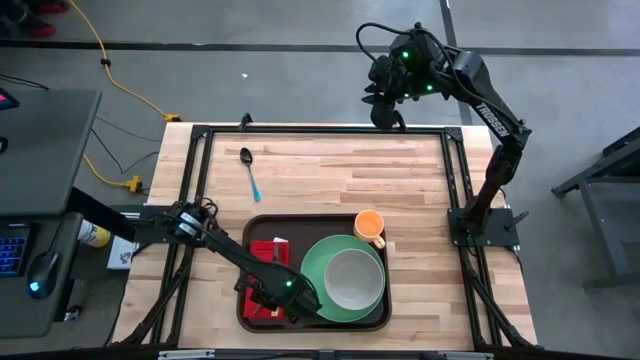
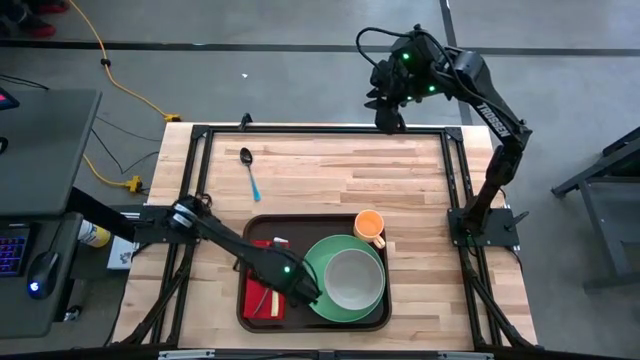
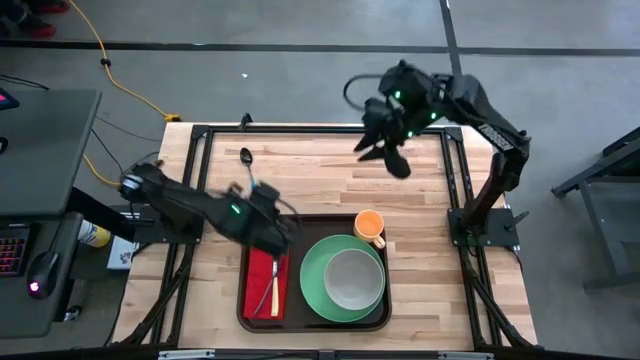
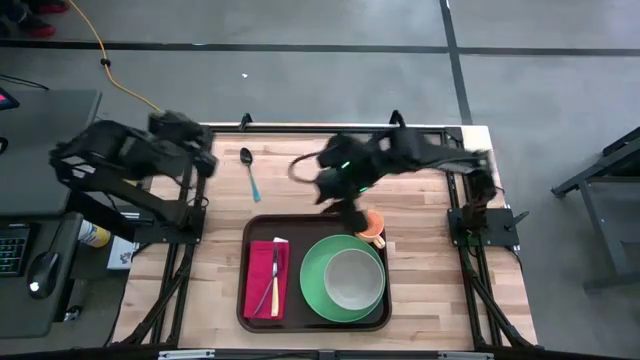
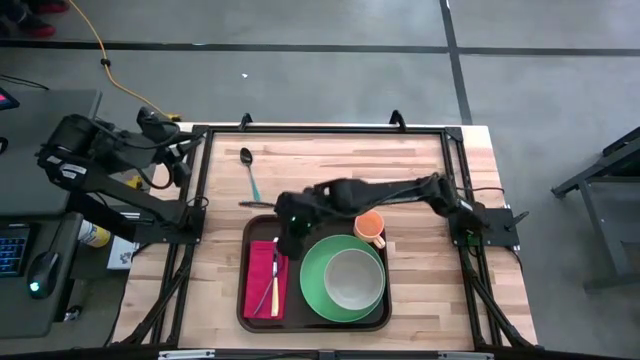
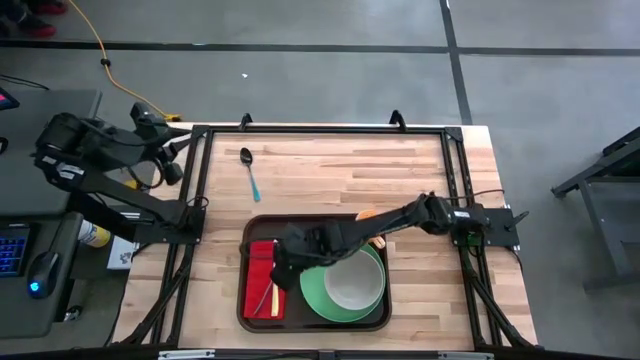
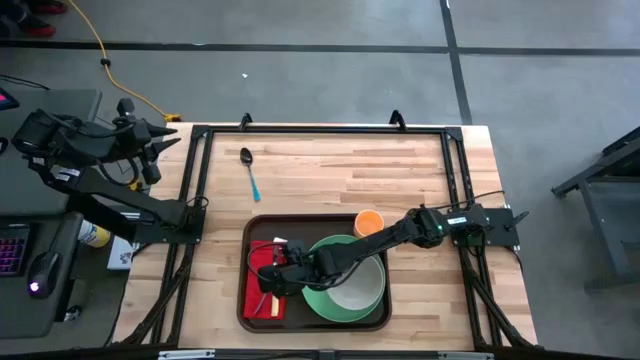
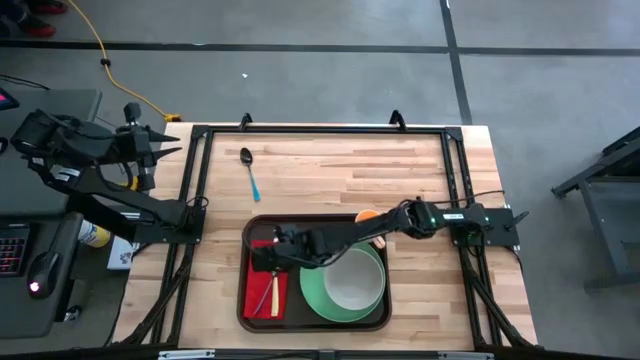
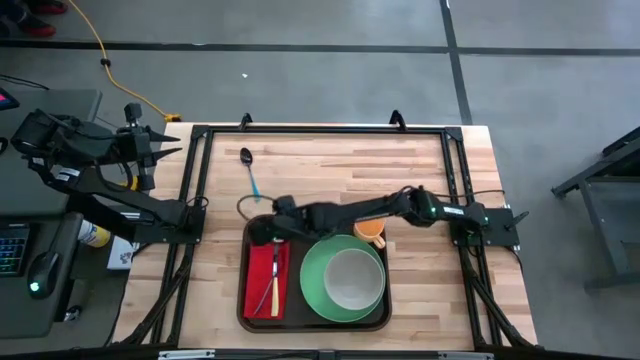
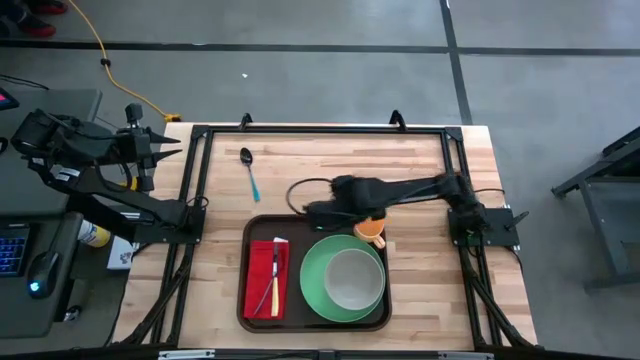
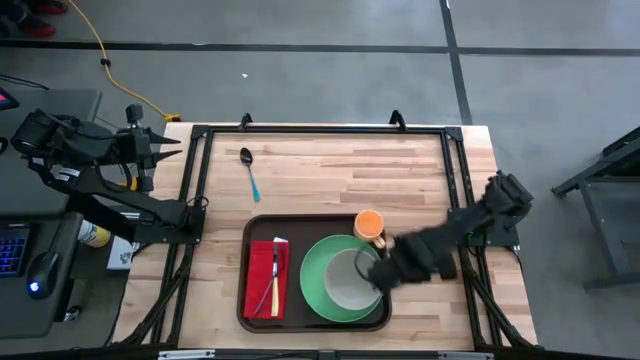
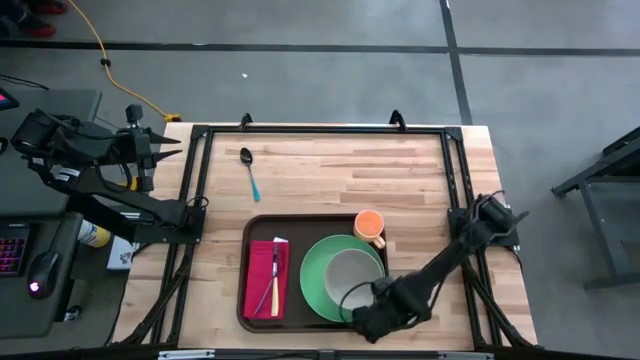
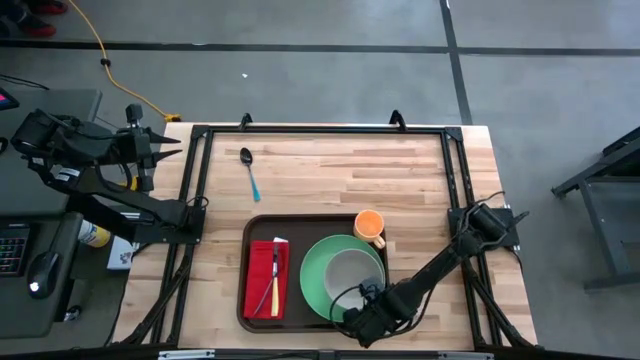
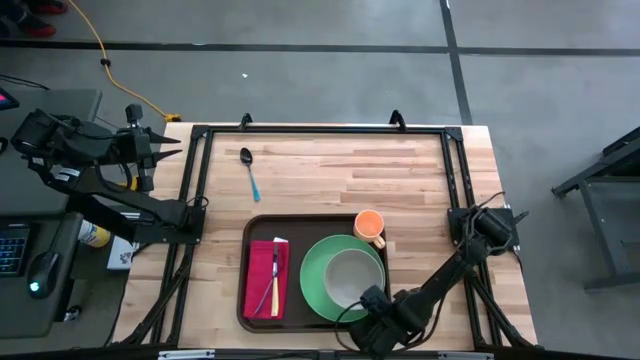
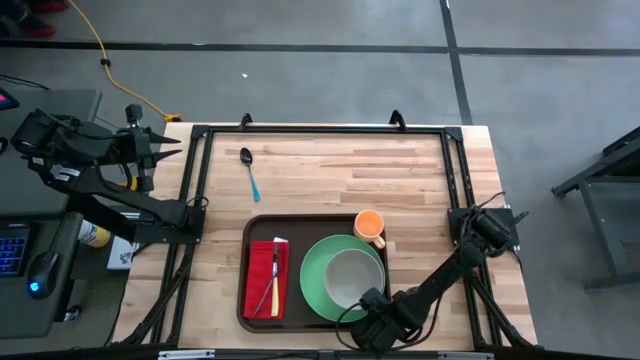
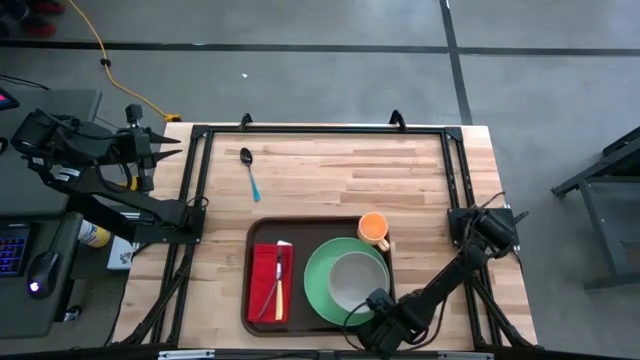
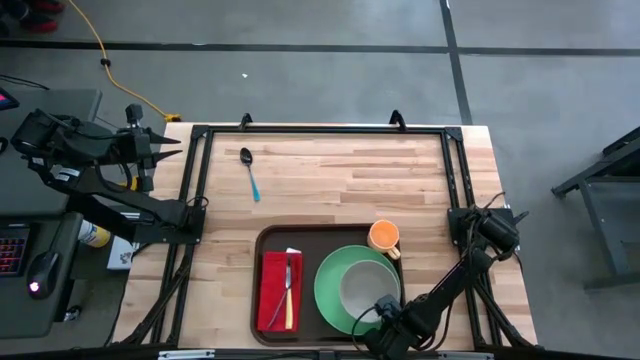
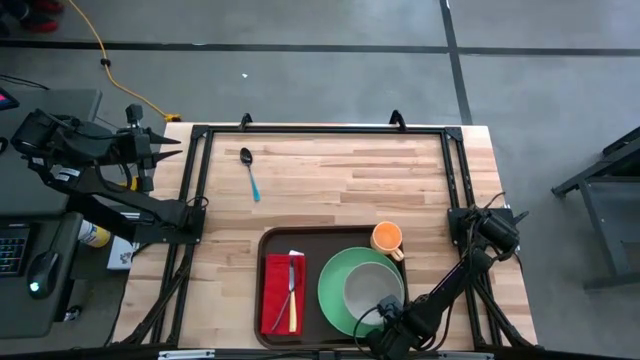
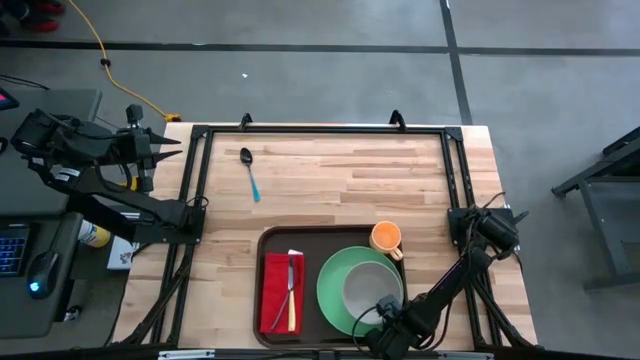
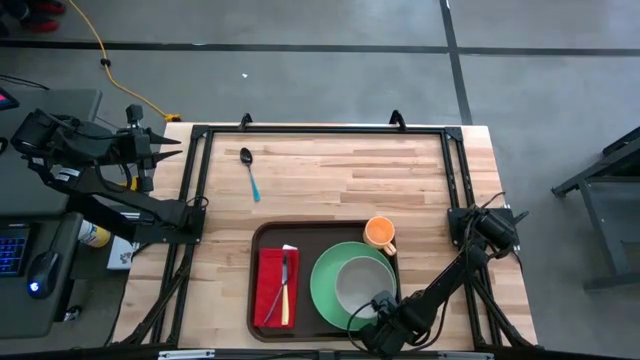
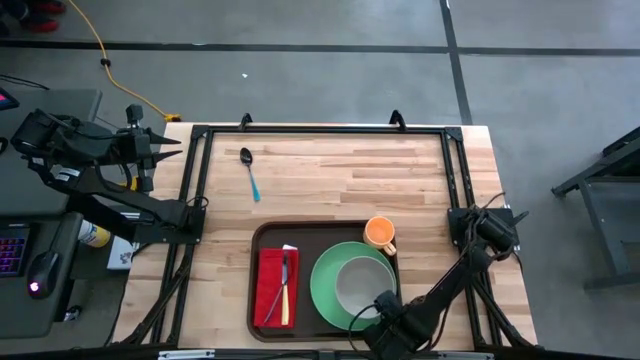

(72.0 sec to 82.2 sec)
Task: Set up tray
Adjust the black serving tray

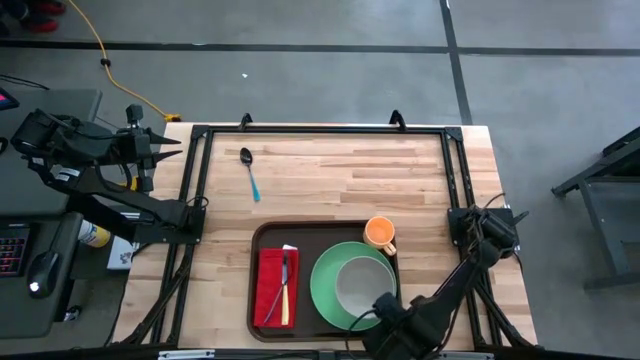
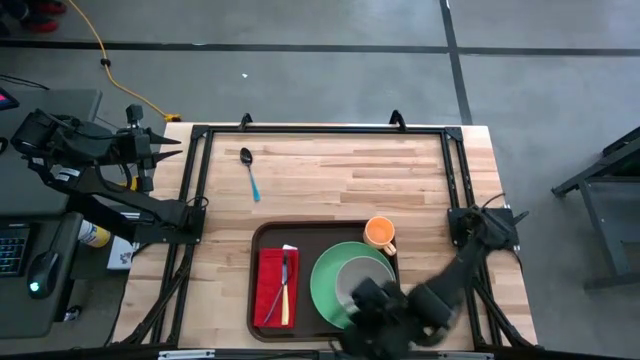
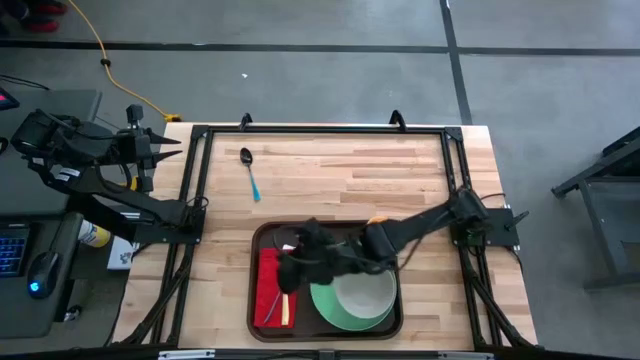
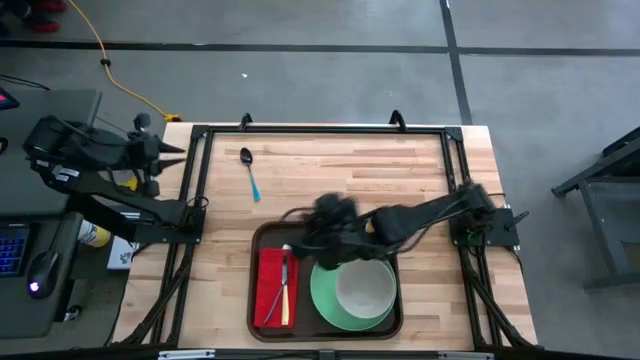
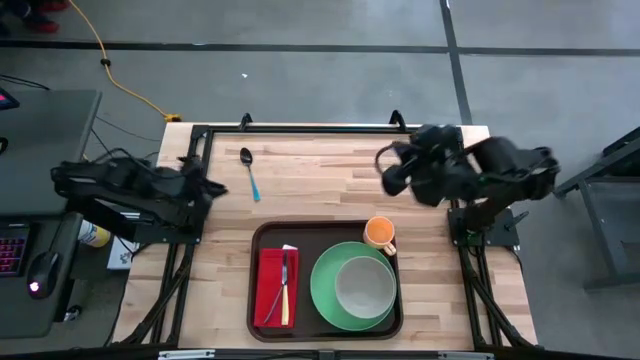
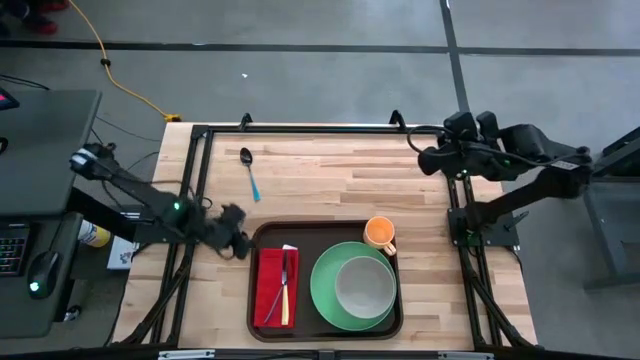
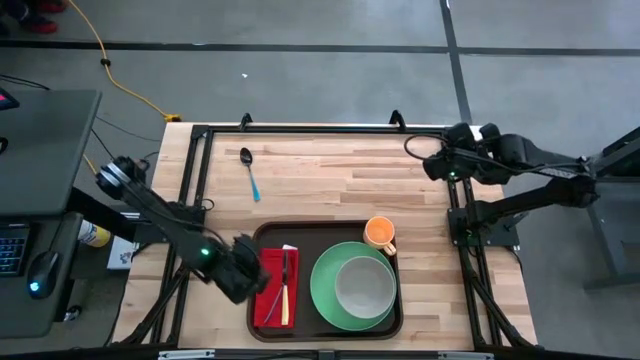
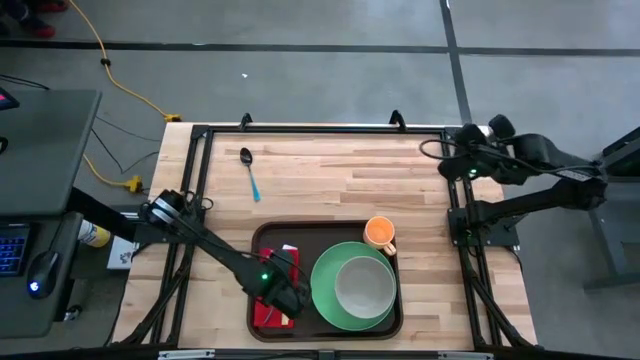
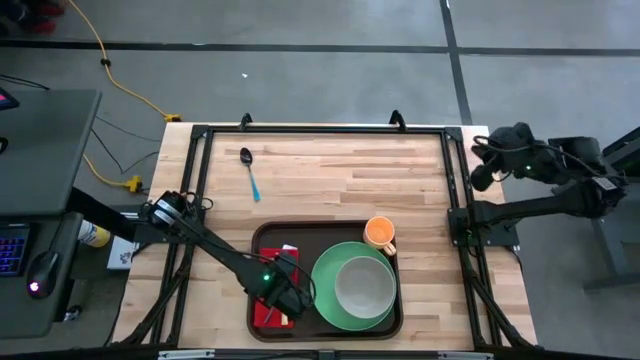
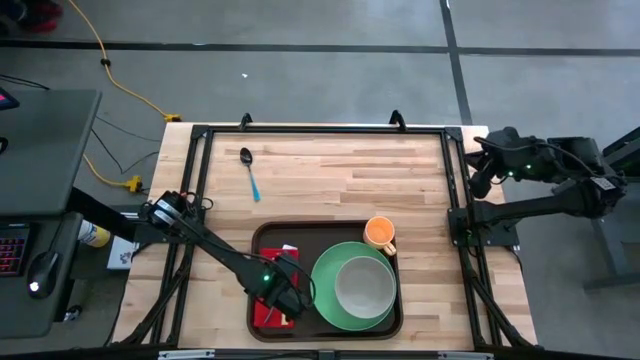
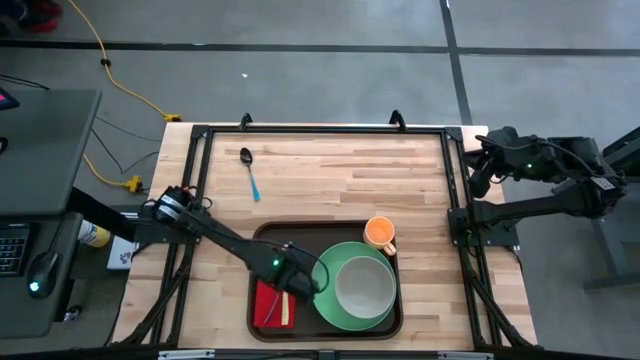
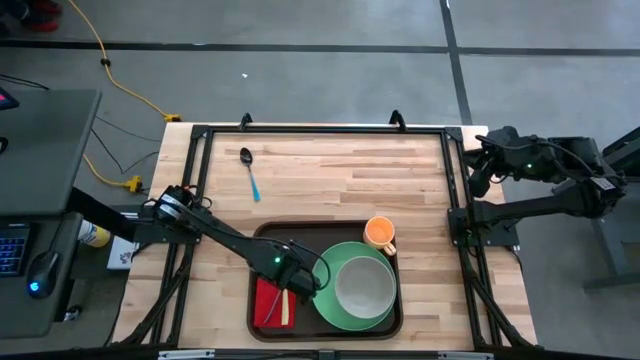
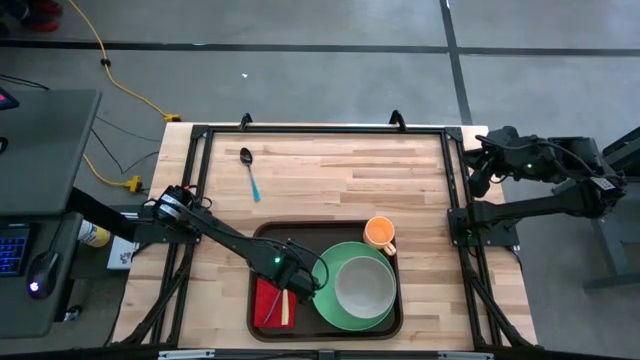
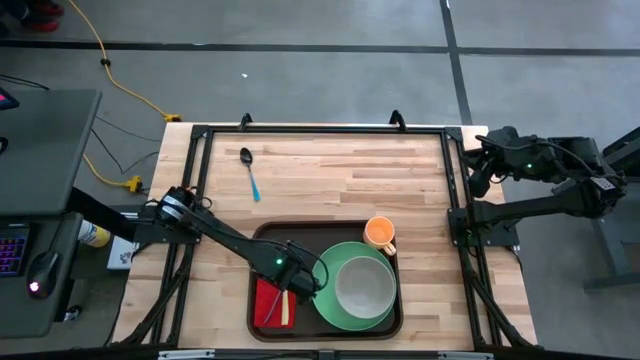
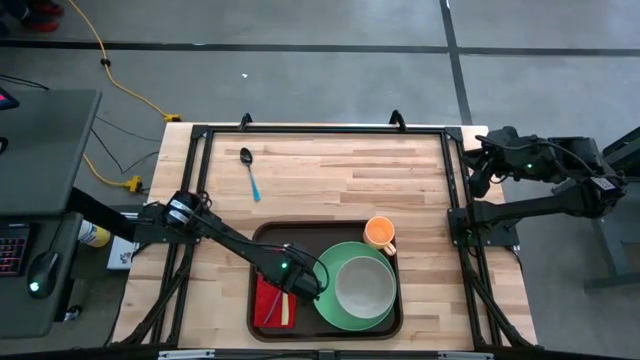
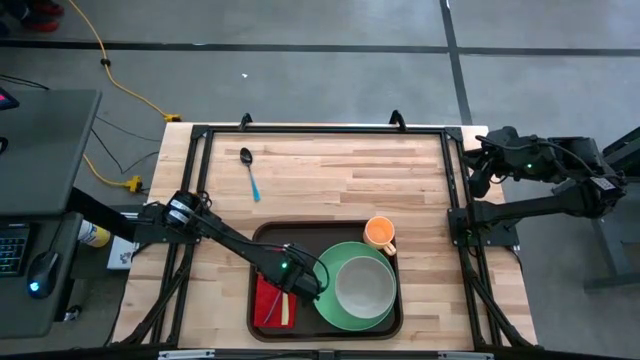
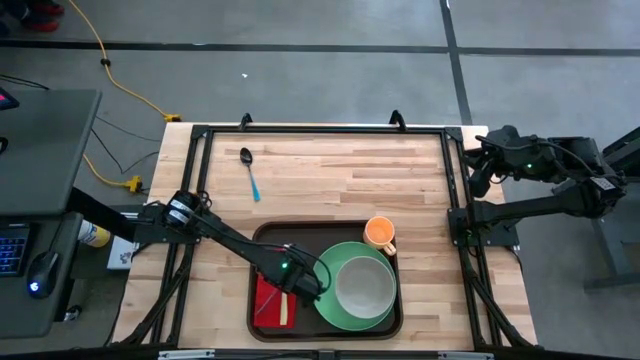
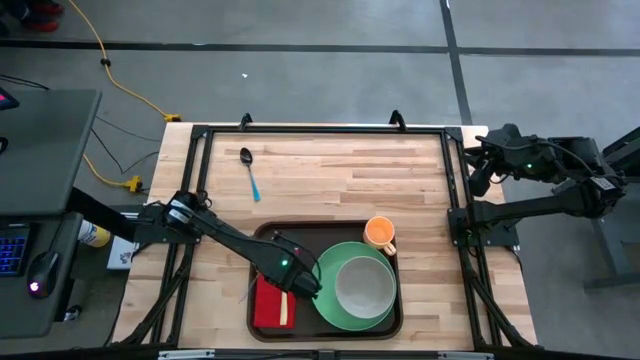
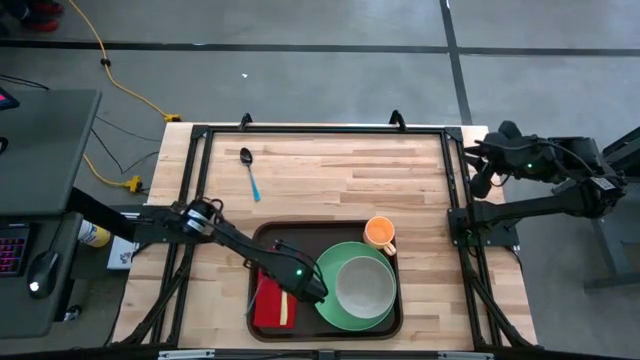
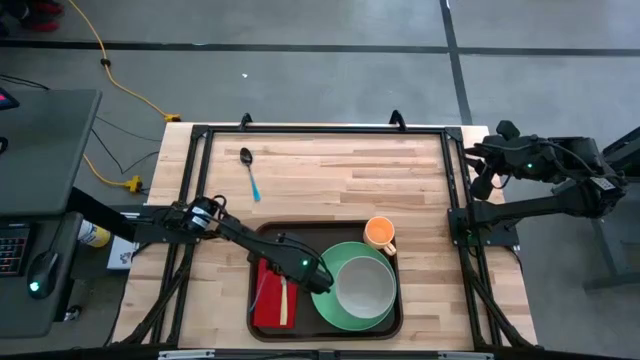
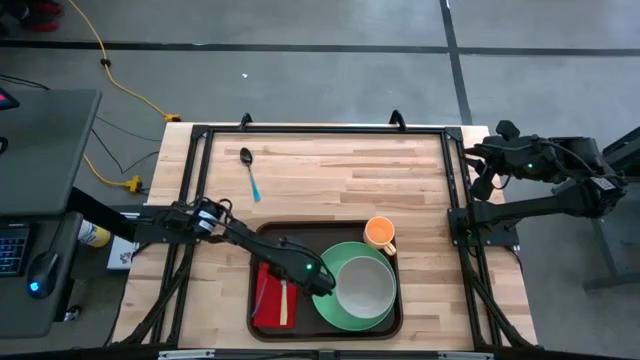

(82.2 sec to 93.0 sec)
Adjust the blue fork on the red napkin
